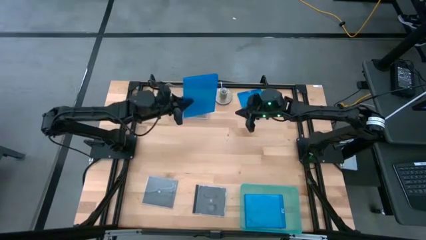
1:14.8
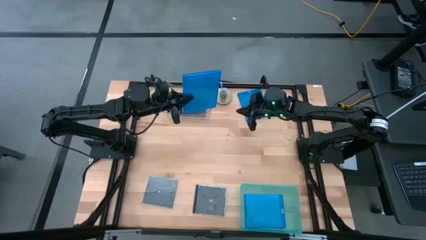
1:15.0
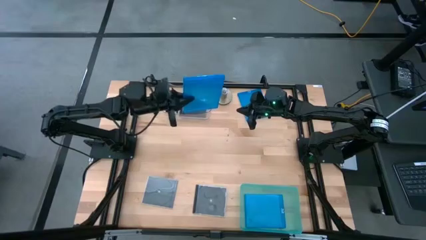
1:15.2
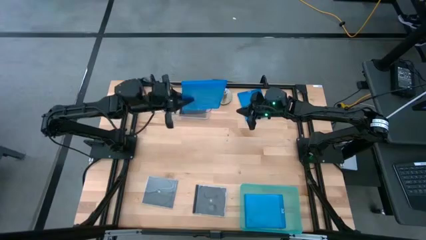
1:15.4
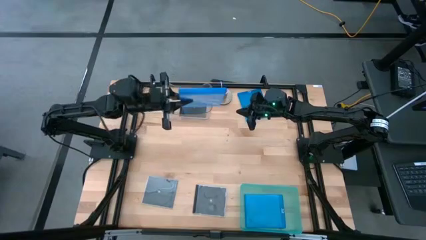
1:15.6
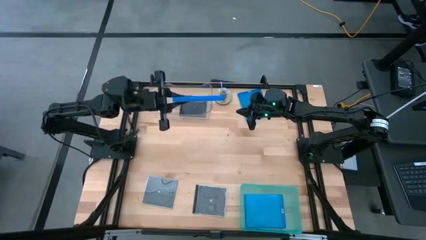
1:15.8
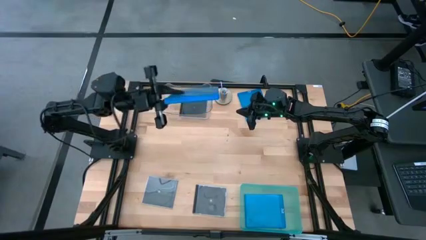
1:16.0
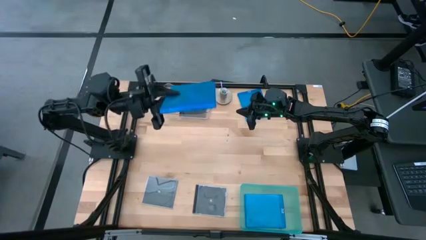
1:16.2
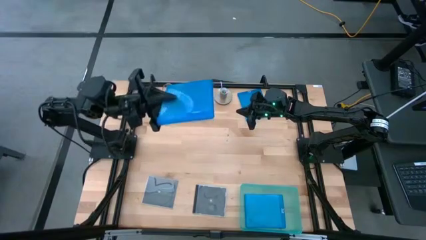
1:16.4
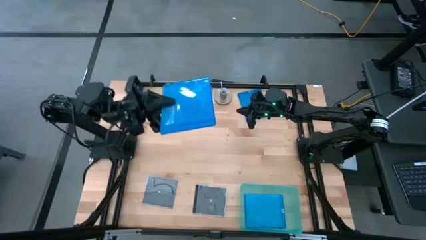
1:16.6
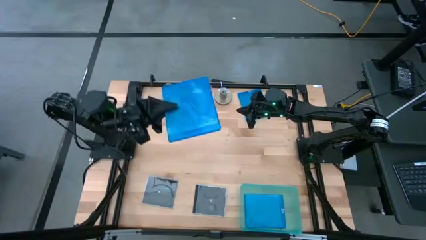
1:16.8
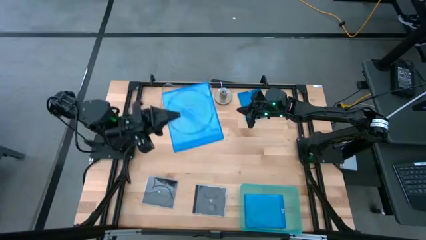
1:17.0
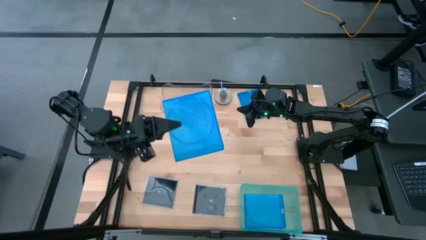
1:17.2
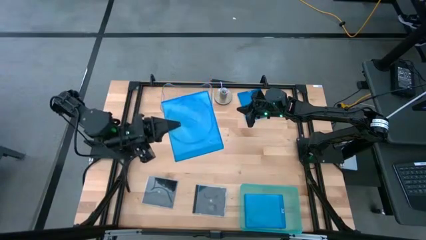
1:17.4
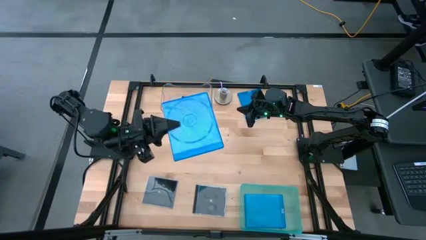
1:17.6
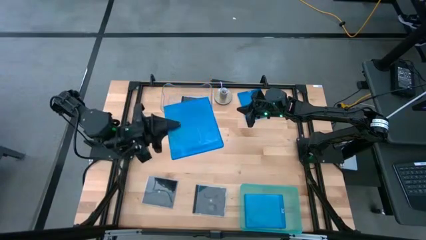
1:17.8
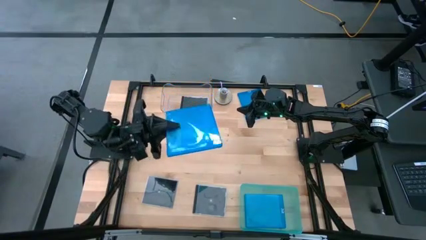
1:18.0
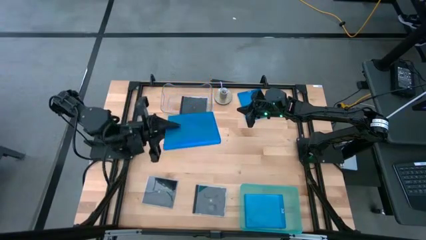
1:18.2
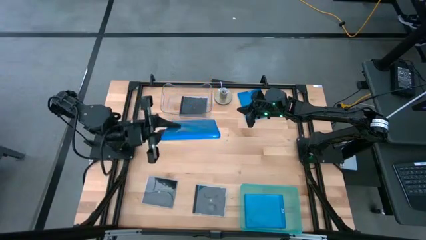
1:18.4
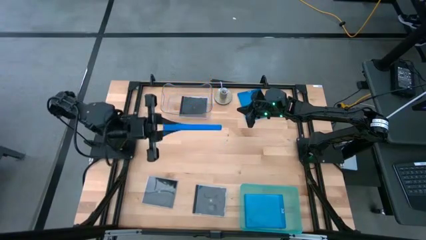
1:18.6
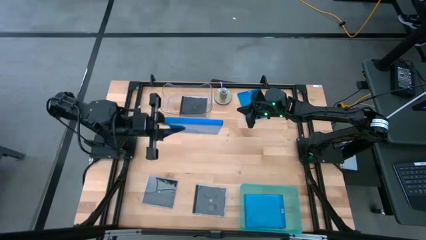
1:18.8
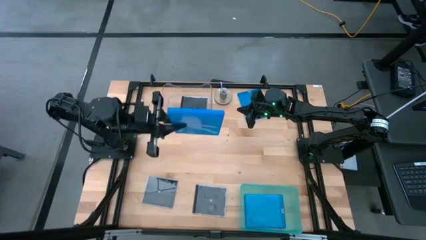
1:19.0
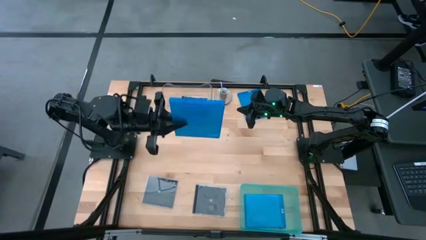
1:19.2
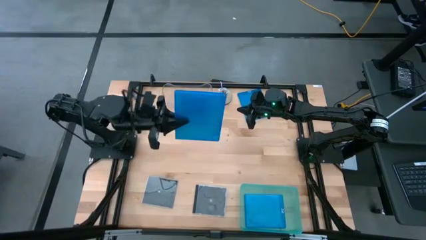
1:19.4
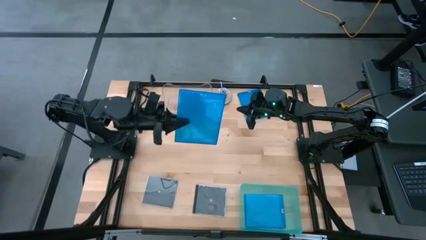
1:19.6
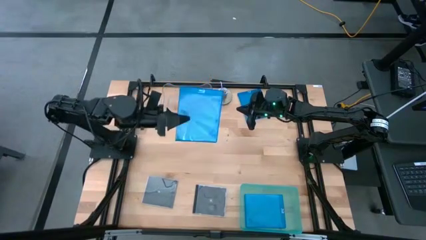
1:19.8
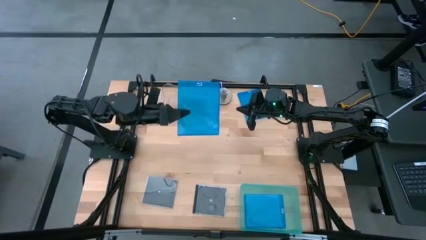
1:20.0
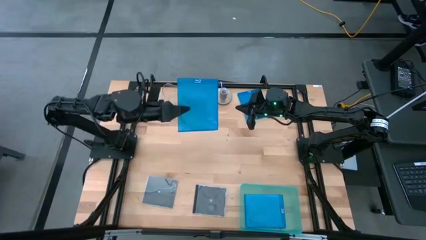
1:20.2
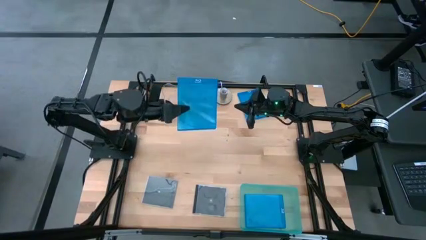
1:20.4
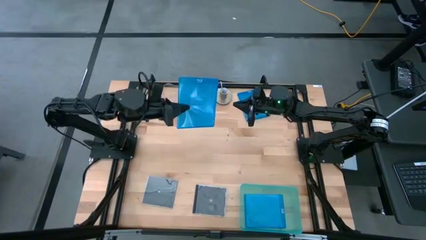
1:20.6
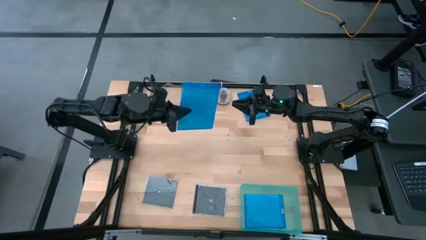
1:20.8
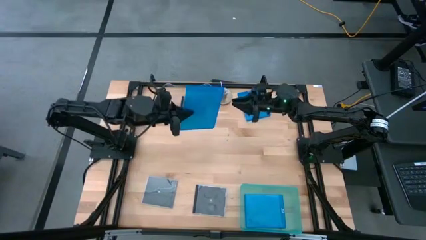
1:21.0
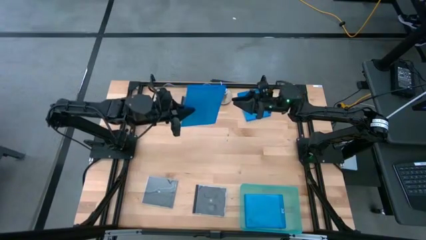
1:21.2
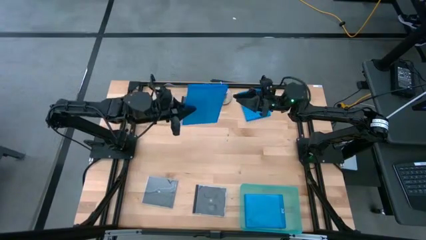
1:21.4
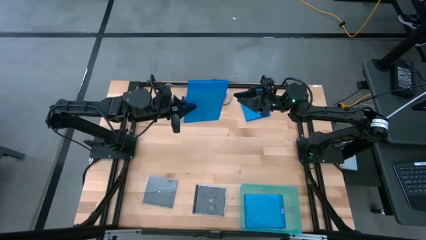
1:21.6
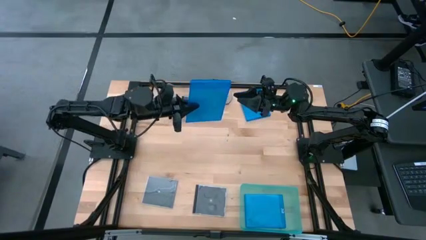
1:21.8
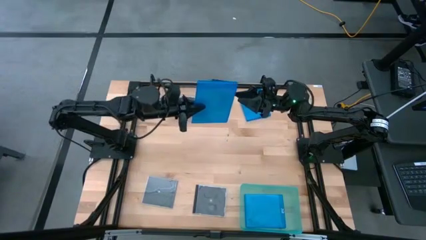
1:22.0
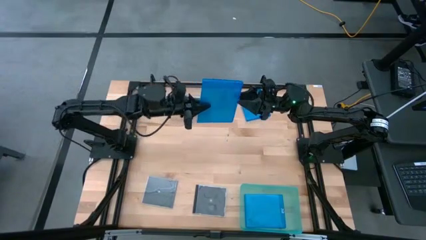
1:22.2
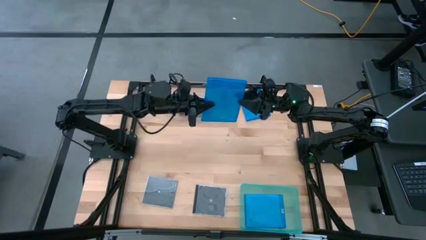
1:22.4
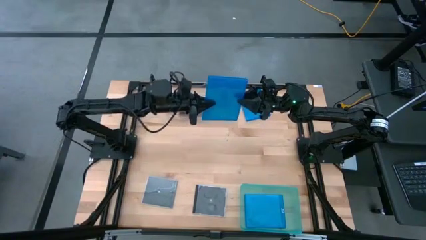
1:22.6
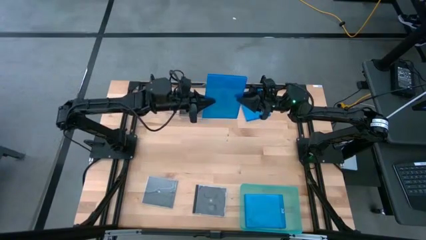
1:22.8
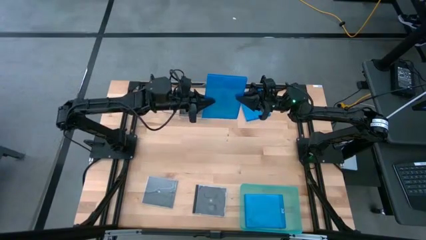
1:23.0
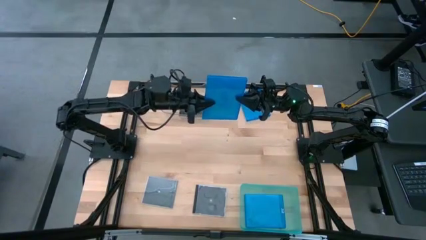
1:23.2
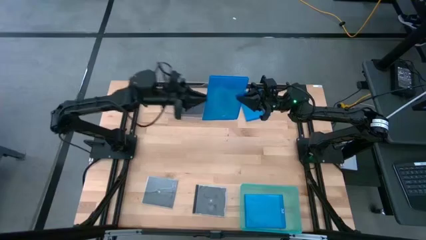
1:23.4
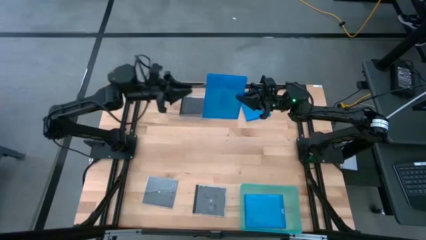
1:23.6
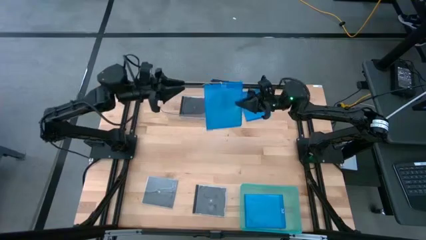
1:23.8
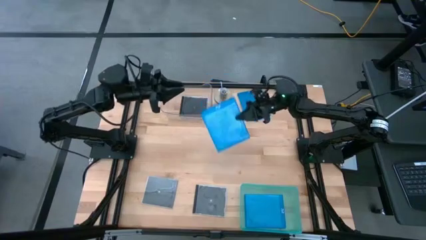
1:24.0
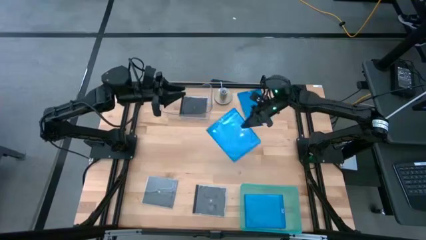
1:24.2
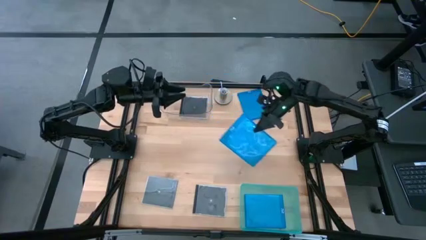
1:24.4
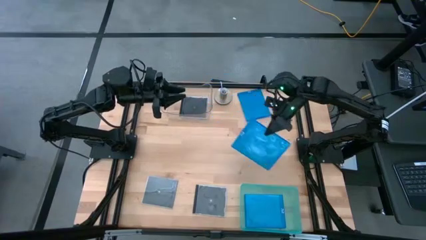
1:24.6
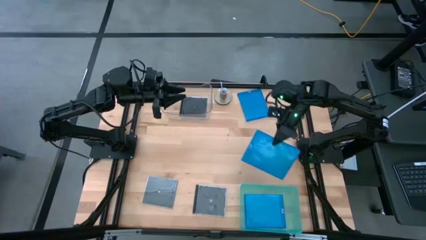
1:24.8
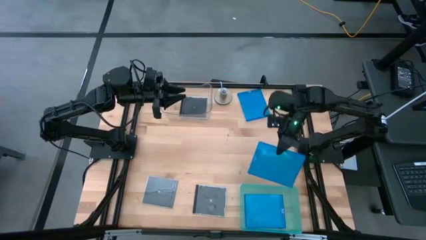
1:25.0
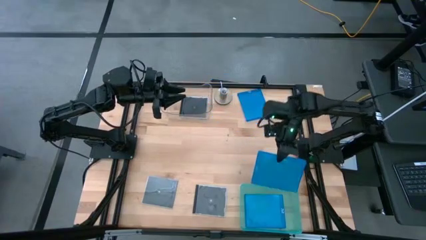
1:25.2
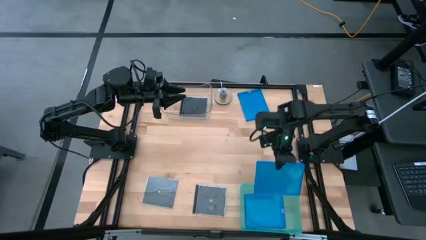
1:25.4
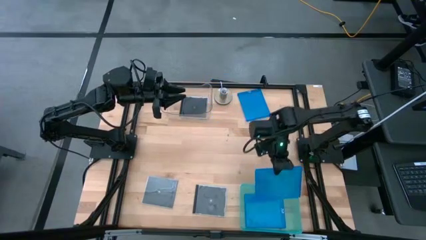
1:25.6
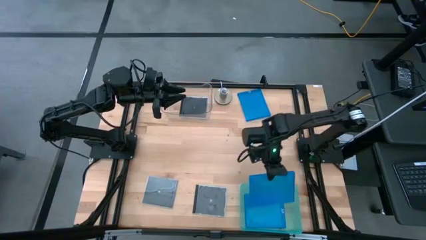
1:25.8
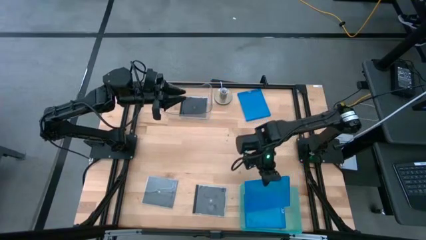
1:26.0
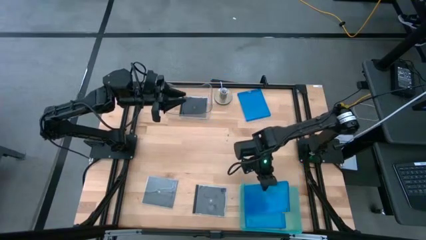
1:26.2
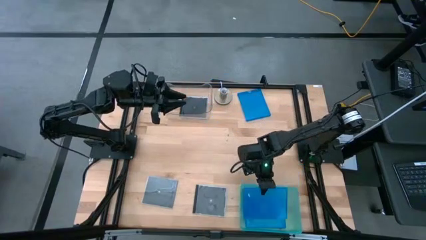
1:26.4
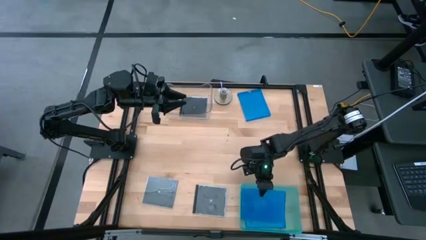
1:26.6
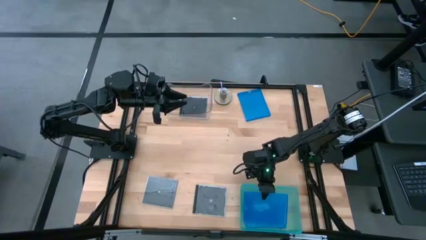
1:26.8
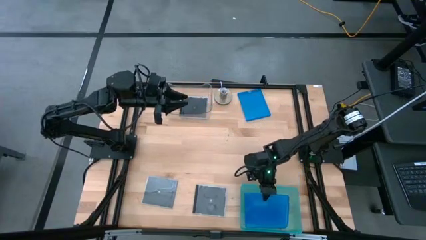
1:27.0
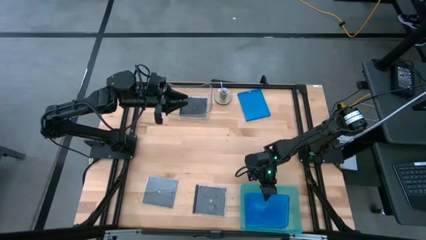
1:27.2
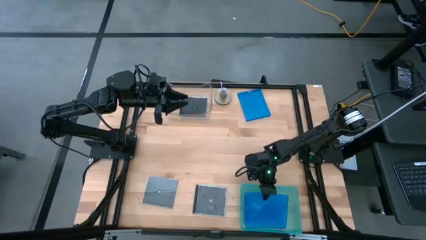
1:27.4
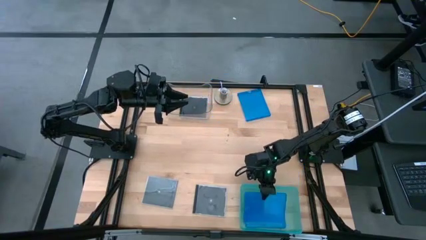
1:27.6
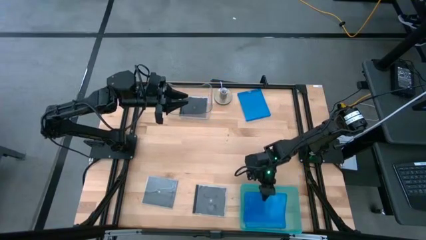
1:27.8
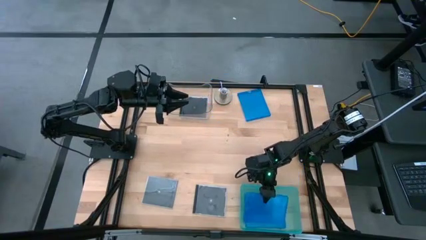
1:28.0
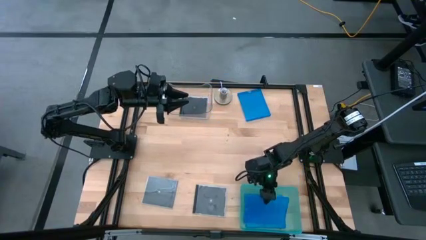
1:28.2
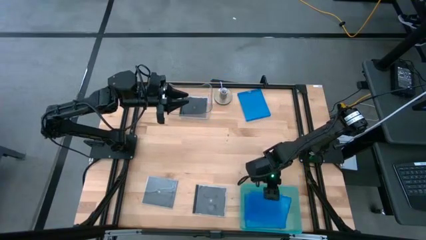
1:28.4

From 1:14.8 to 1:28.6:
Task: Pick & place jewel cases by type
Put the bottom blue cd case into the green bin
